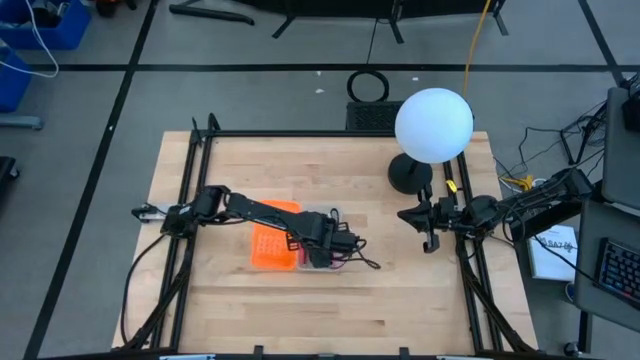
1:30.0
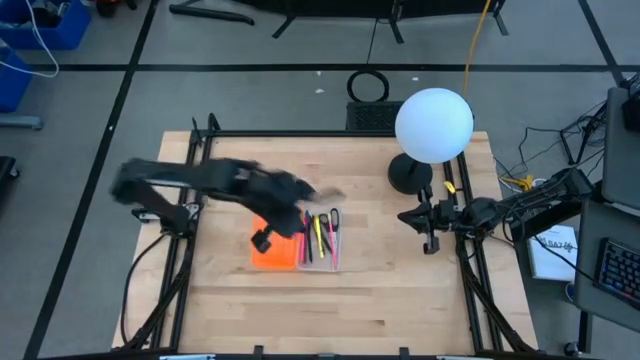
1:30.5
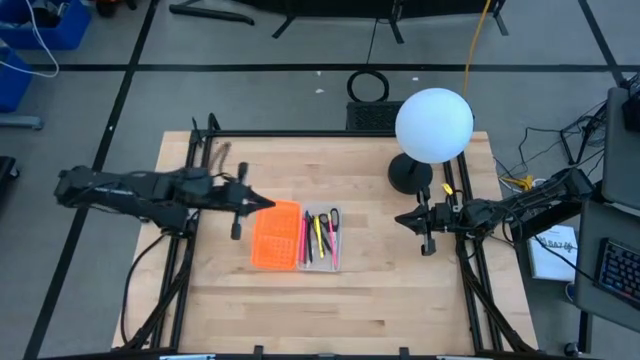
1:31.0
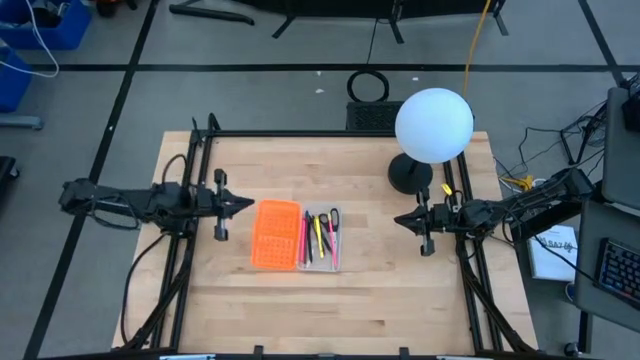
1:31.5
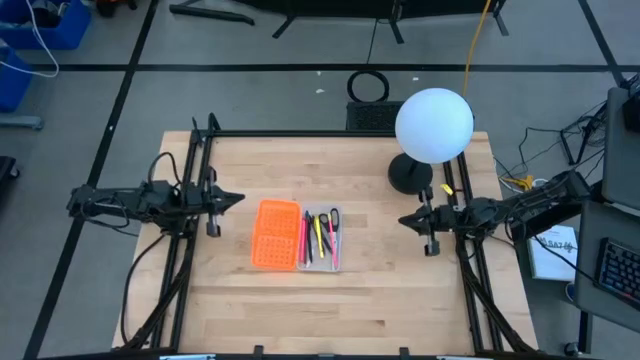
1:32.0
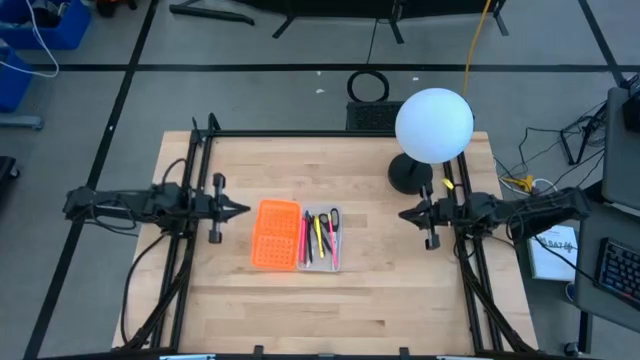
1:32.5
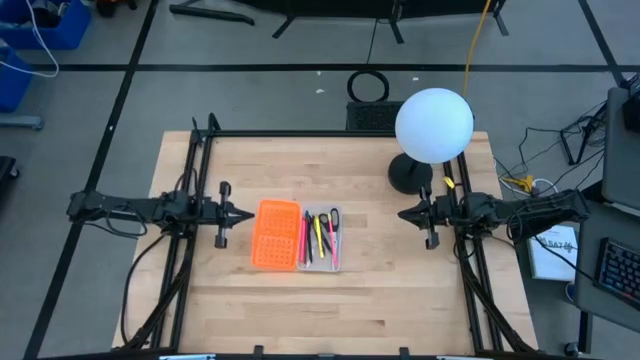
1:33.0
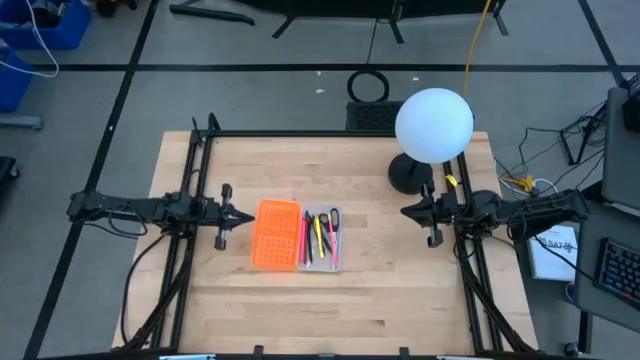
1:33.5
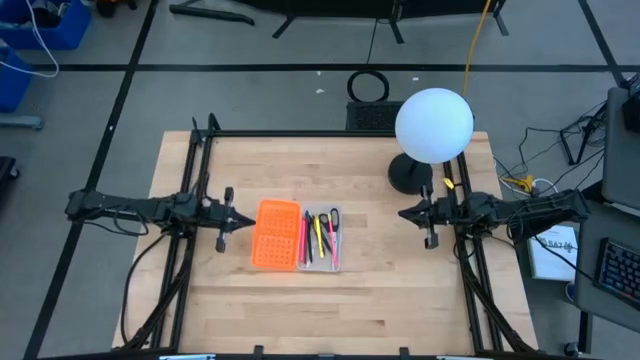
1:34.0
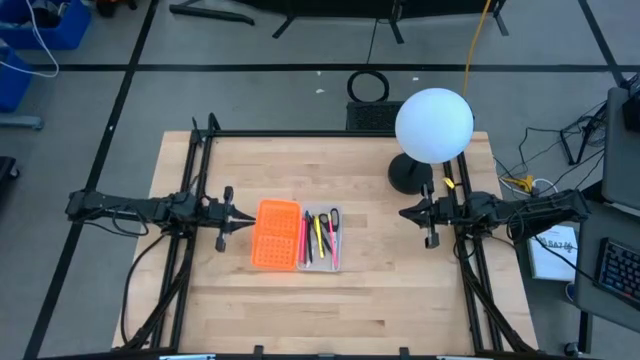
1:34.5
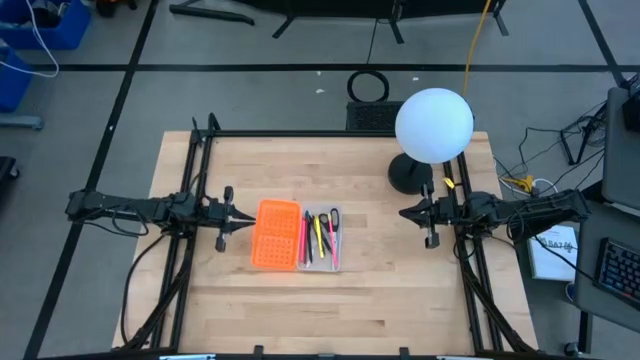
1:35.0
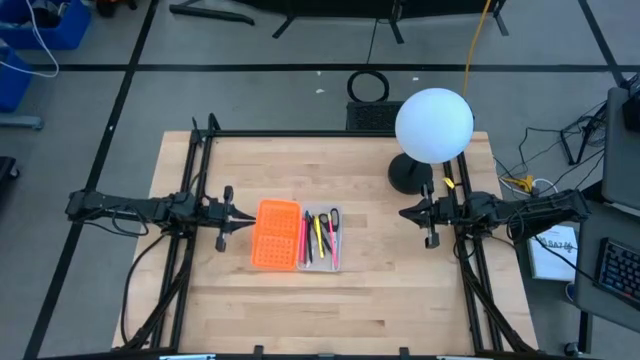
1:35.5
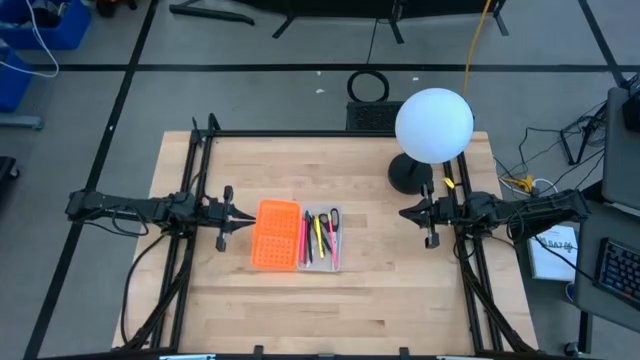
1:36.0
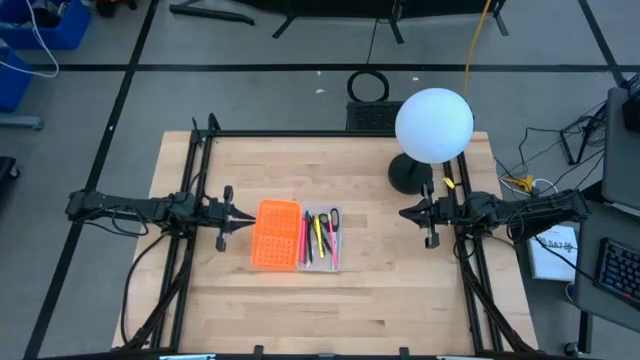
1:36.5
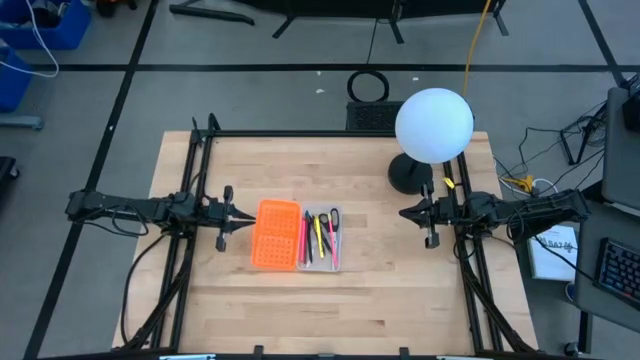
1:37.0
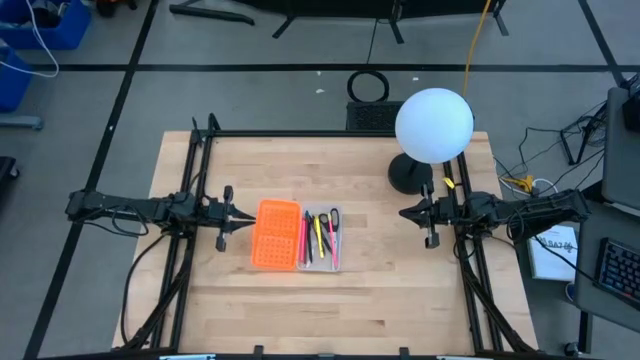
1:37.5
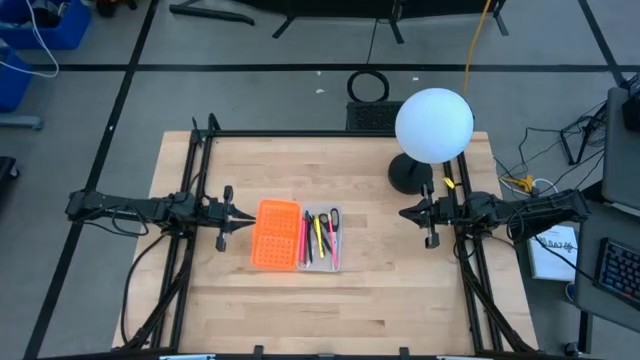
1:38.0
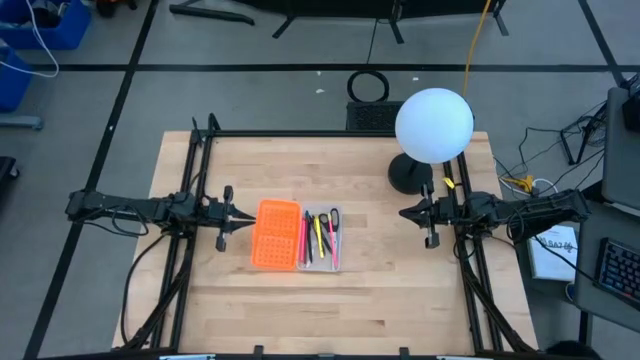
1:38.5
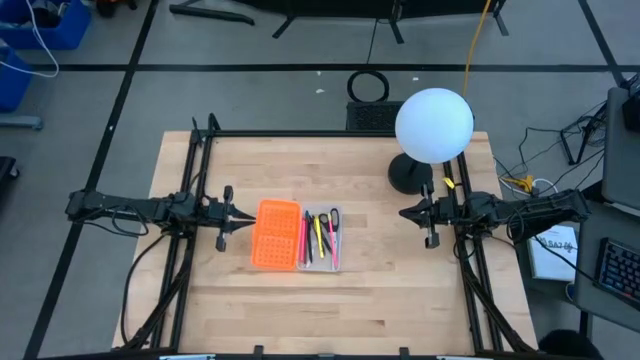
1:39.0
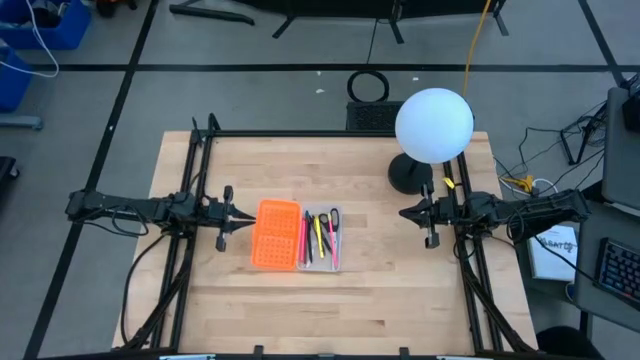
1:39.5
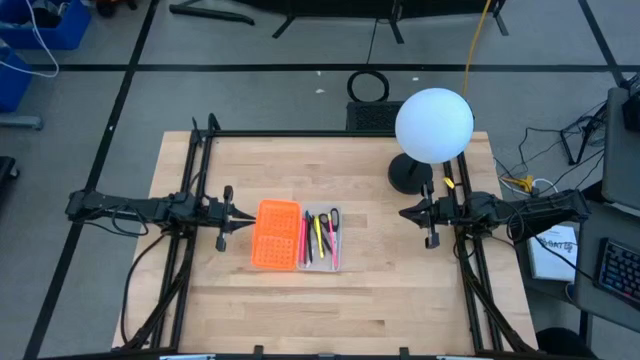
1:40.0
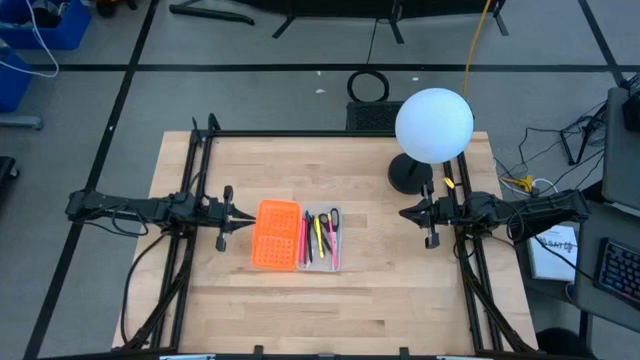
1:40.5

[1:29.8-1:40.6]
Task: Pick & place school supplies into a supply box
Return to Home Position

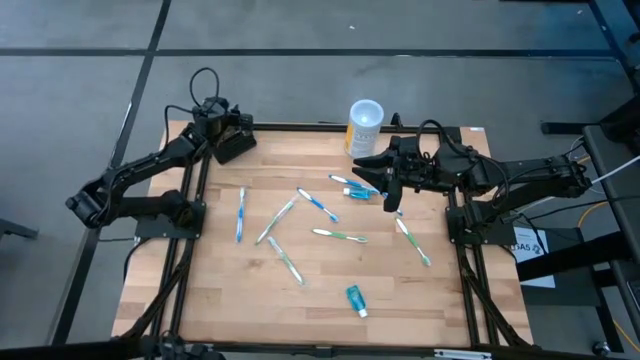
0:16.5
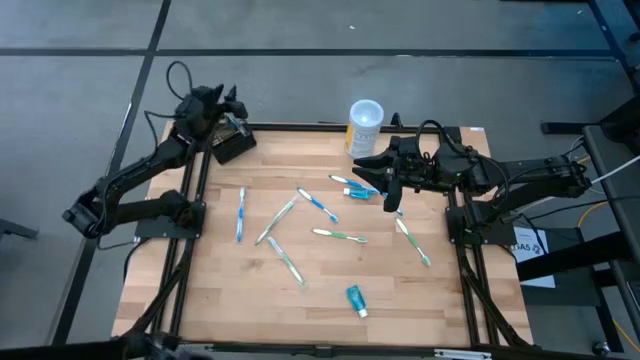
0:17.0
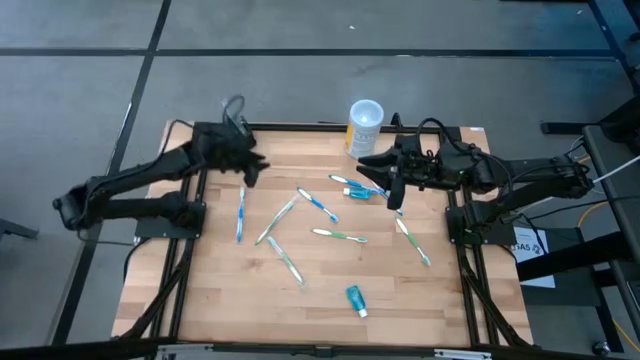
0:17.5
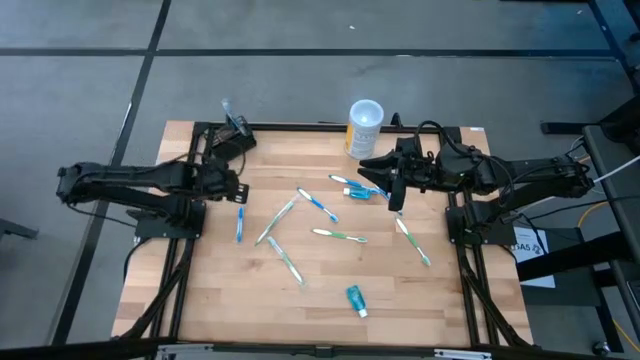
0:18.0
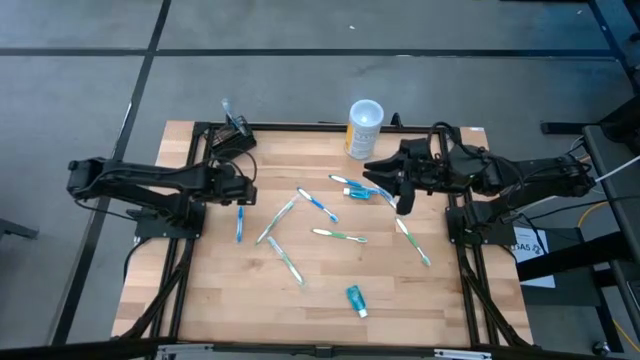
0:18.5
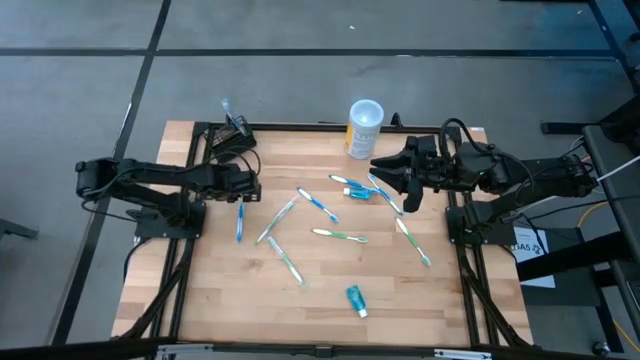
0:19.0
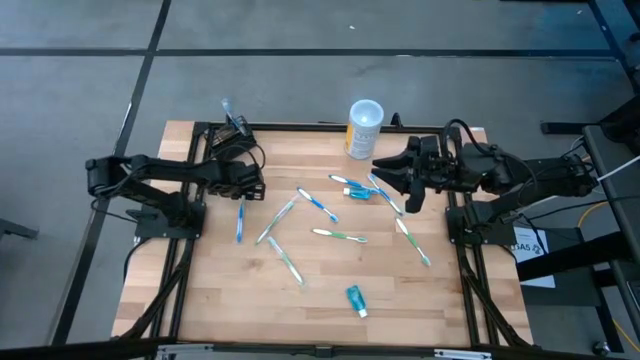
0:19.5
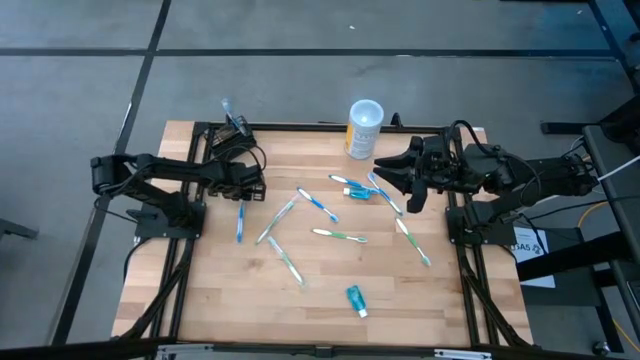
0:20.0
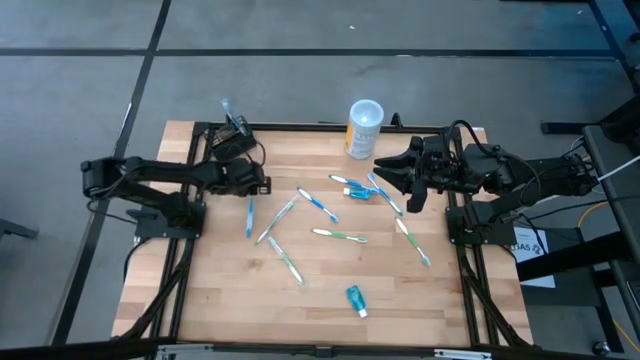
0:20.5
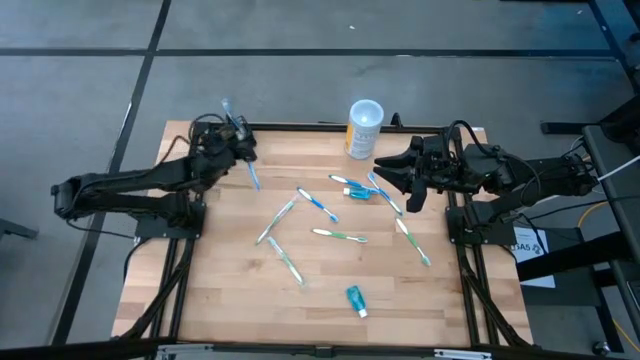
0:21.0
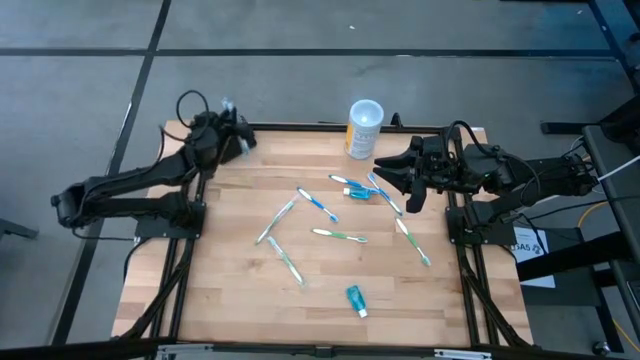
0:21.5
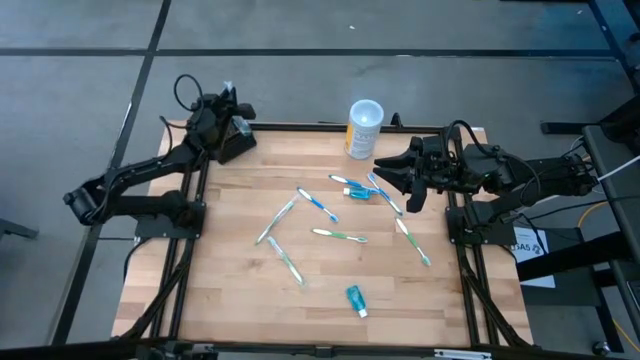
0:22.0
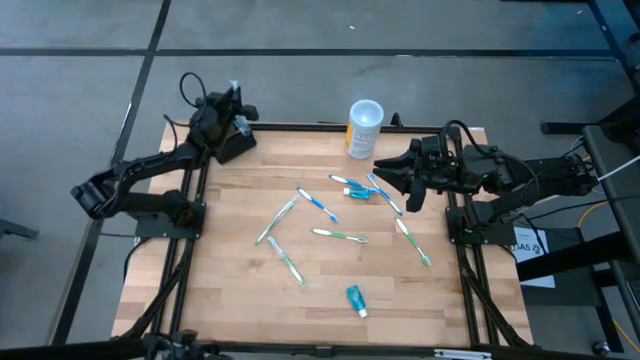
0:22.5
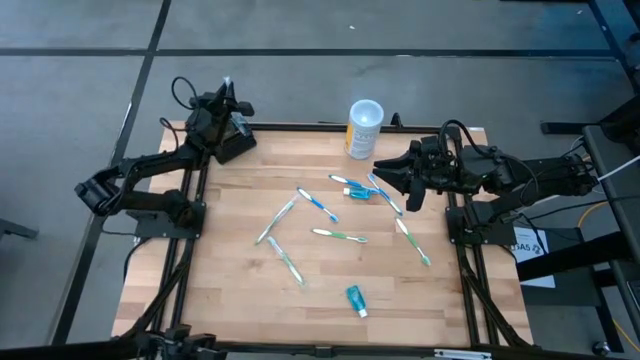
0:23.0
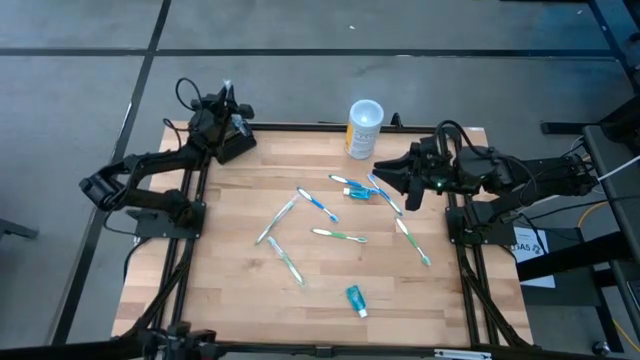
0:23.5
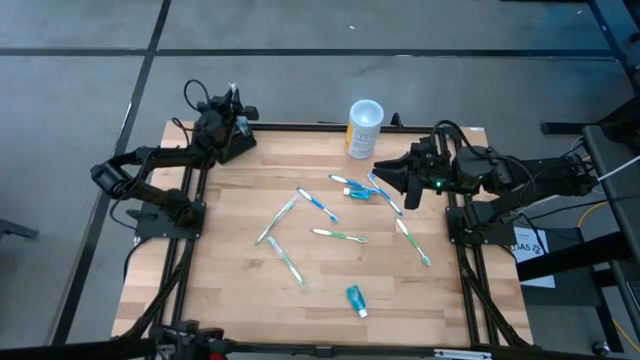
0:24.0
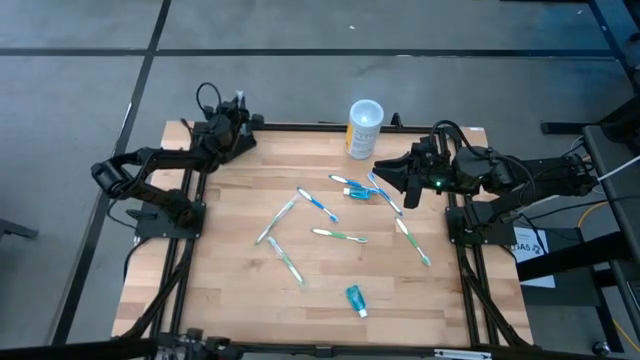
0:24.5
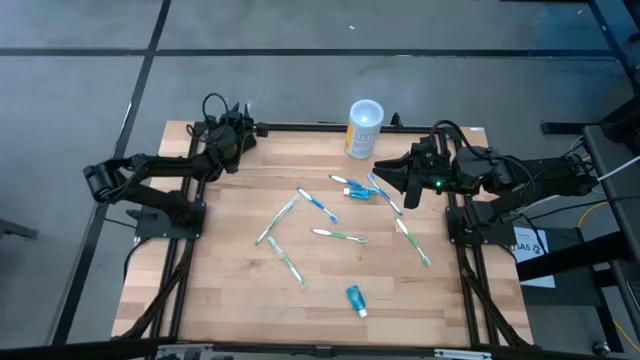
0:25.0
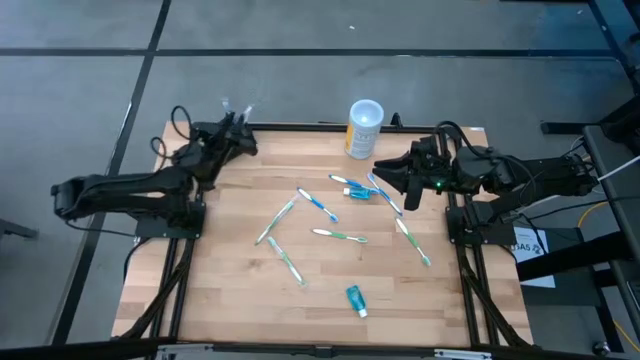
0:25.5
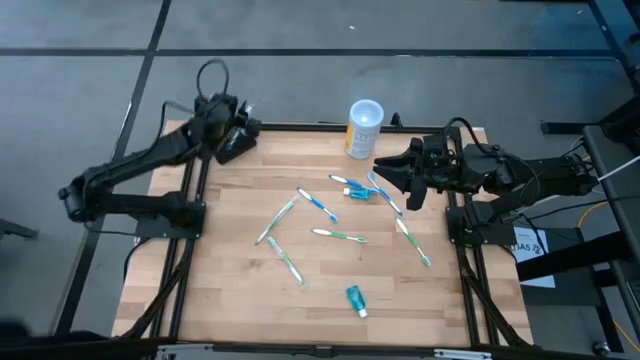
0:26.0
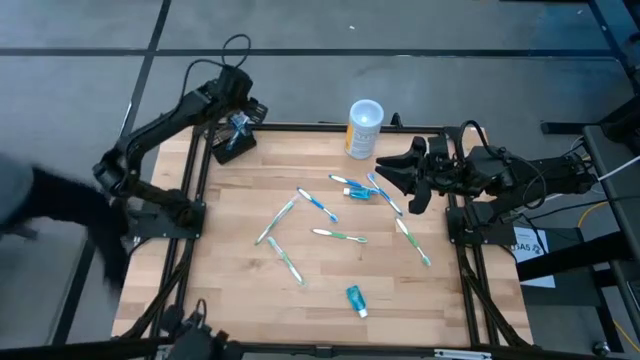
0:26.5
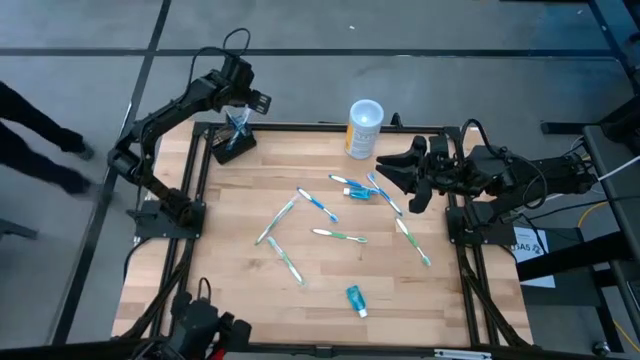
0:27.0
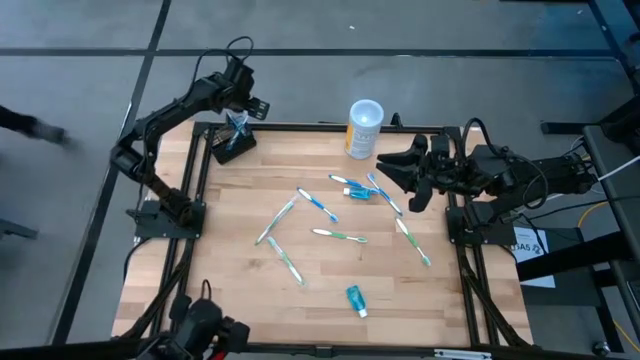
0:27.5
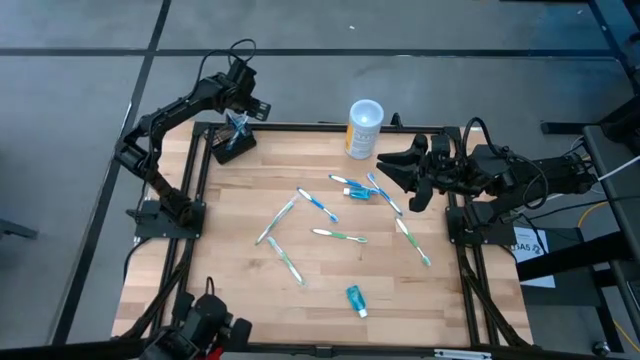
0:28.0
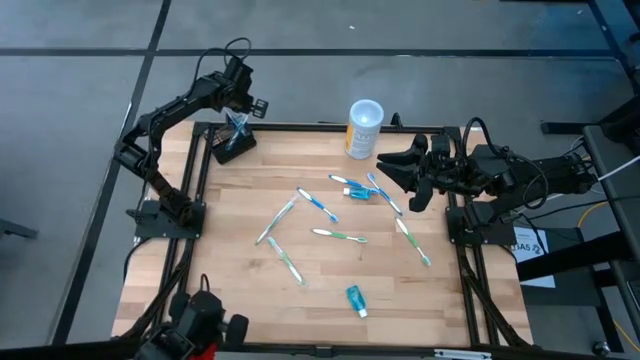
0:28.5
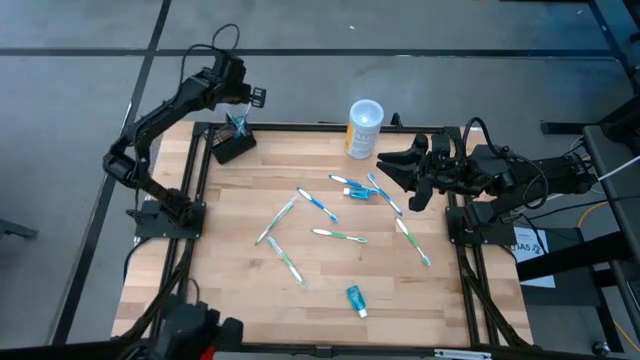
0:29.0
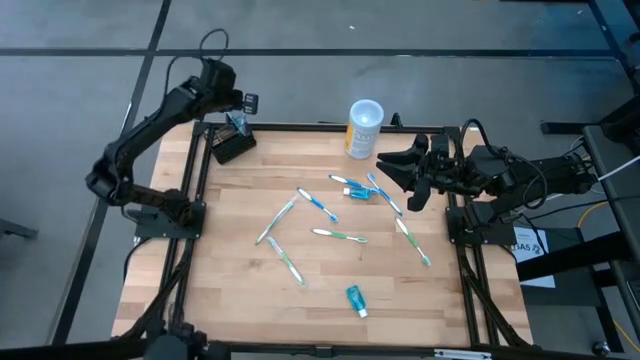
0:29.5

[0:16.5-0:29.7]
Task: Pick & Place toothbrushing station
Put the blue toothbrush into the right section of the black organizer
